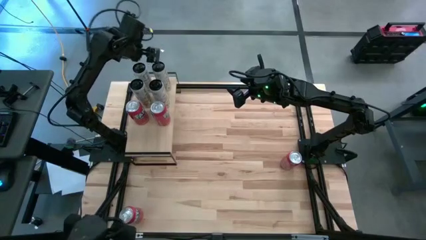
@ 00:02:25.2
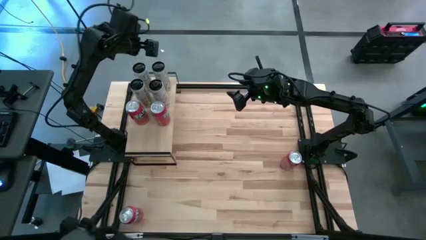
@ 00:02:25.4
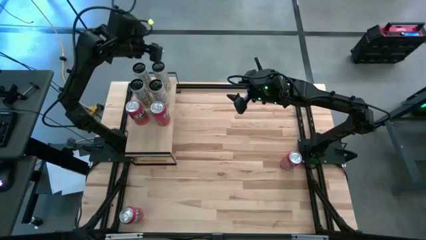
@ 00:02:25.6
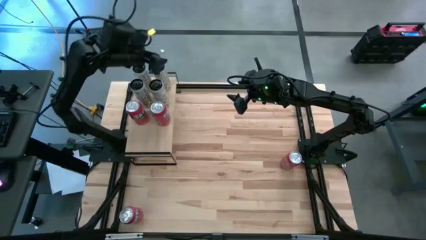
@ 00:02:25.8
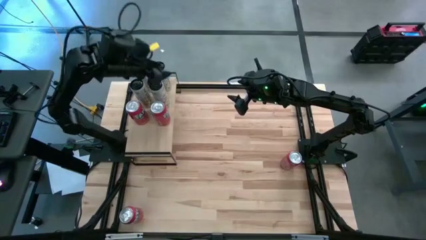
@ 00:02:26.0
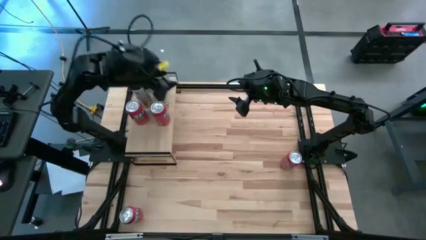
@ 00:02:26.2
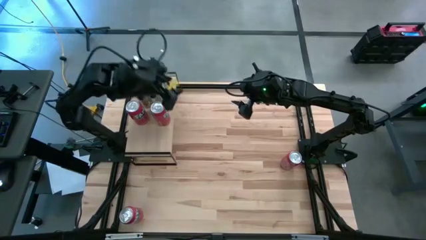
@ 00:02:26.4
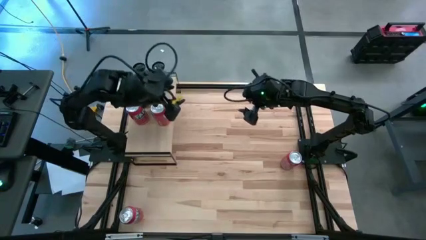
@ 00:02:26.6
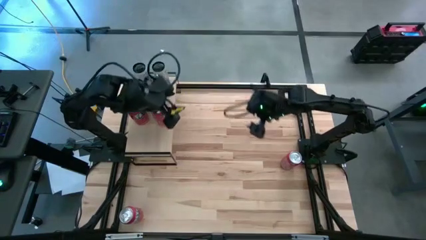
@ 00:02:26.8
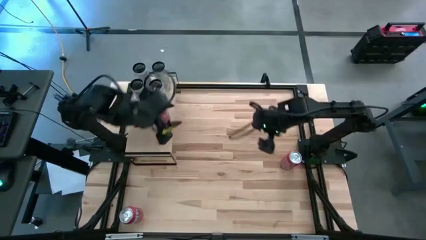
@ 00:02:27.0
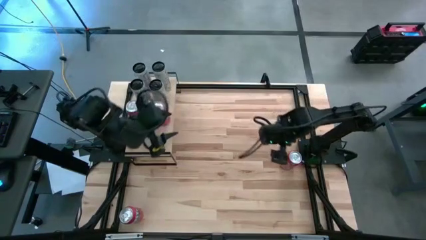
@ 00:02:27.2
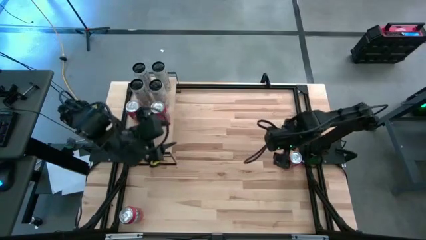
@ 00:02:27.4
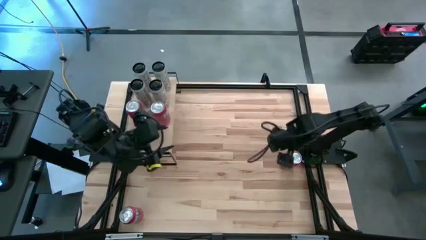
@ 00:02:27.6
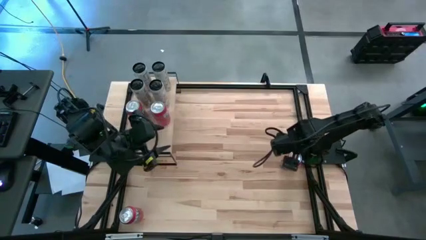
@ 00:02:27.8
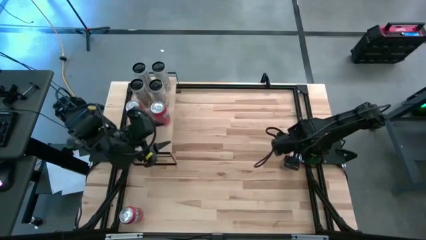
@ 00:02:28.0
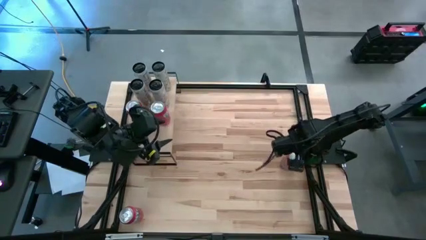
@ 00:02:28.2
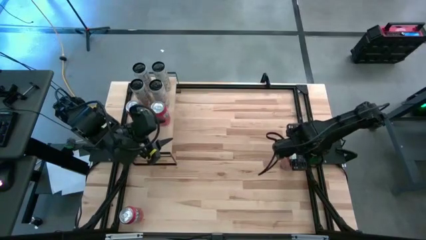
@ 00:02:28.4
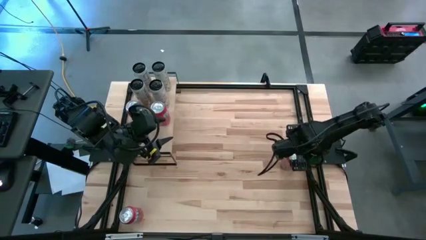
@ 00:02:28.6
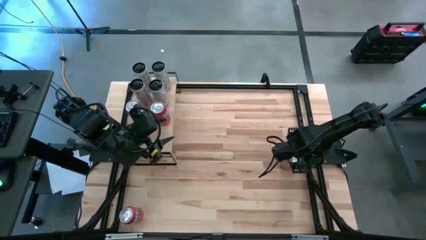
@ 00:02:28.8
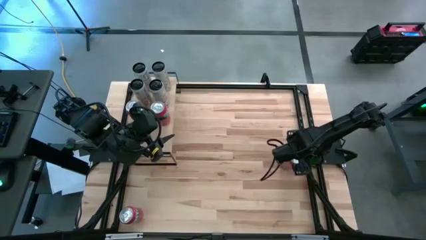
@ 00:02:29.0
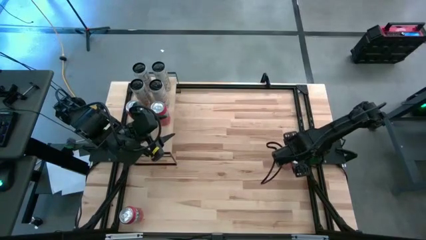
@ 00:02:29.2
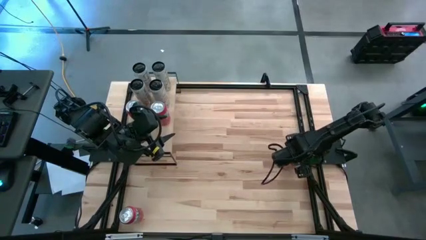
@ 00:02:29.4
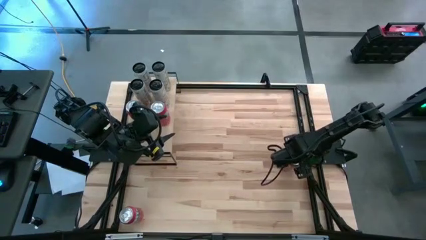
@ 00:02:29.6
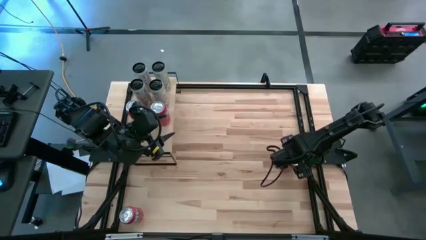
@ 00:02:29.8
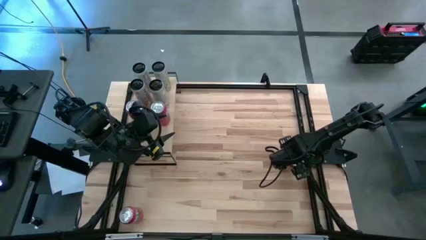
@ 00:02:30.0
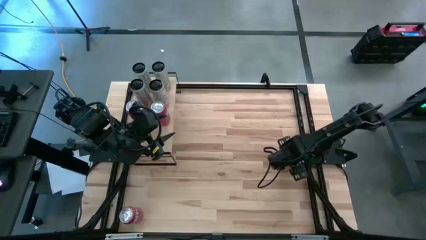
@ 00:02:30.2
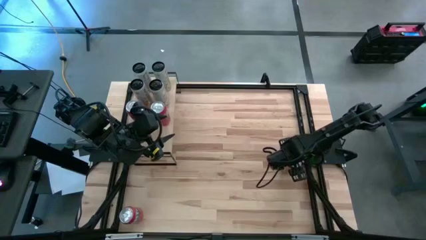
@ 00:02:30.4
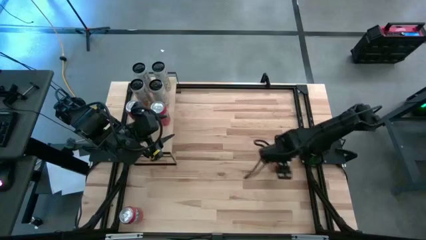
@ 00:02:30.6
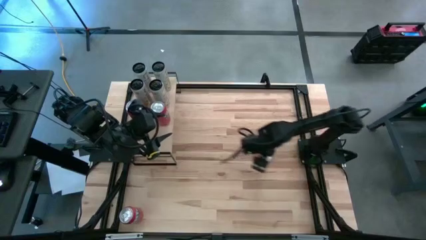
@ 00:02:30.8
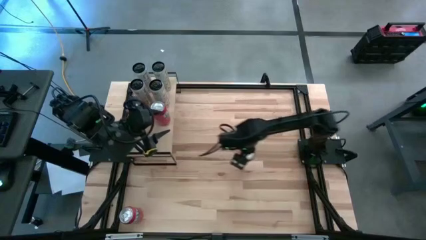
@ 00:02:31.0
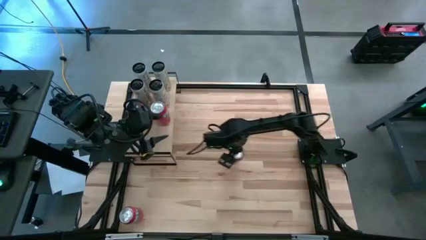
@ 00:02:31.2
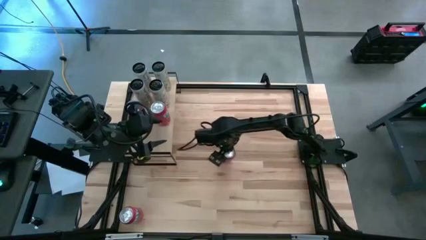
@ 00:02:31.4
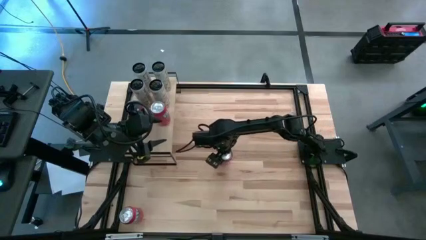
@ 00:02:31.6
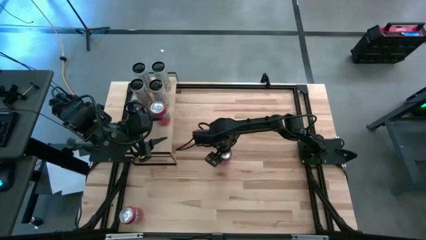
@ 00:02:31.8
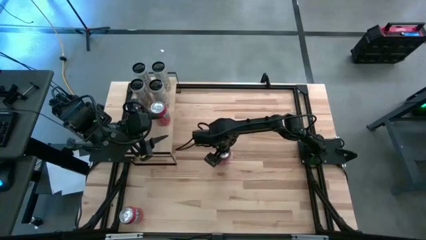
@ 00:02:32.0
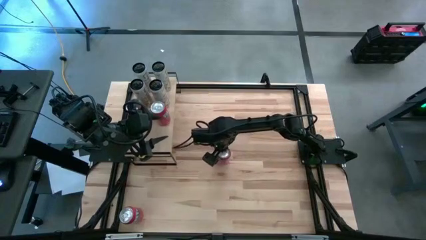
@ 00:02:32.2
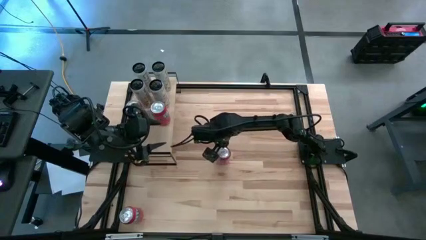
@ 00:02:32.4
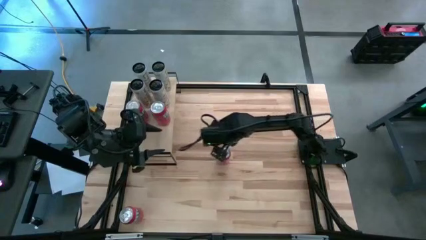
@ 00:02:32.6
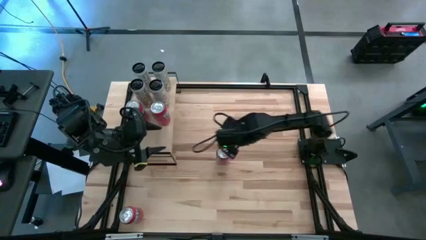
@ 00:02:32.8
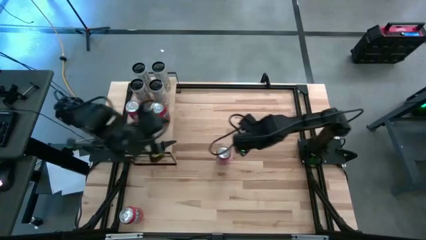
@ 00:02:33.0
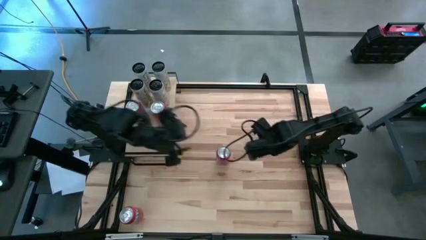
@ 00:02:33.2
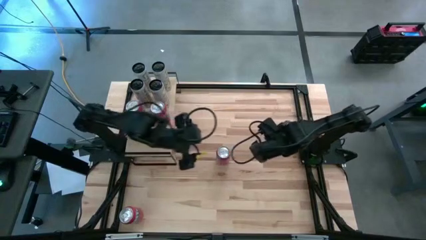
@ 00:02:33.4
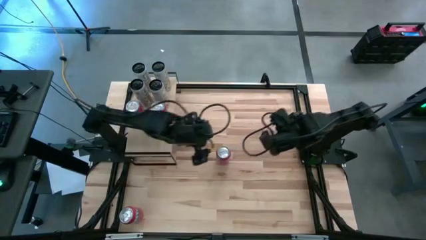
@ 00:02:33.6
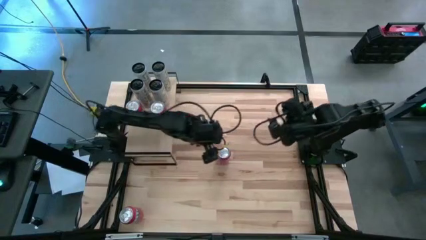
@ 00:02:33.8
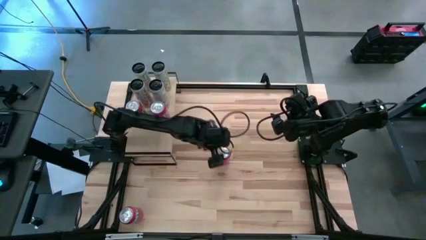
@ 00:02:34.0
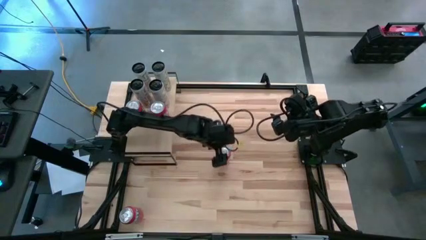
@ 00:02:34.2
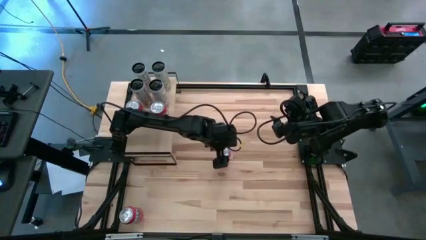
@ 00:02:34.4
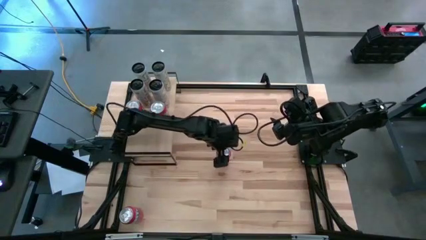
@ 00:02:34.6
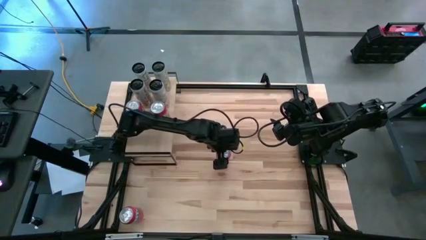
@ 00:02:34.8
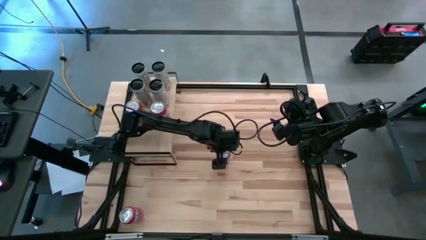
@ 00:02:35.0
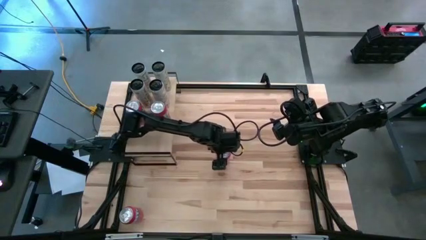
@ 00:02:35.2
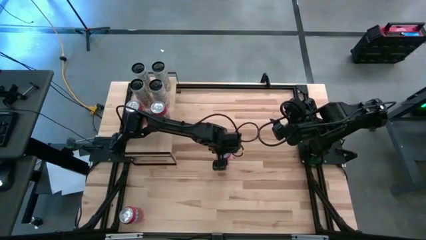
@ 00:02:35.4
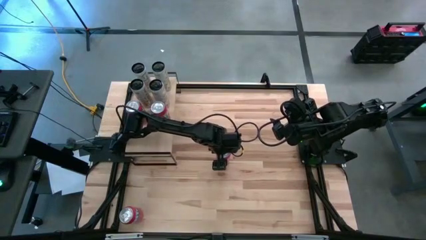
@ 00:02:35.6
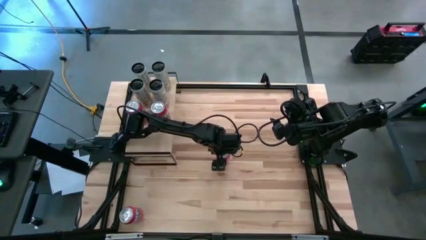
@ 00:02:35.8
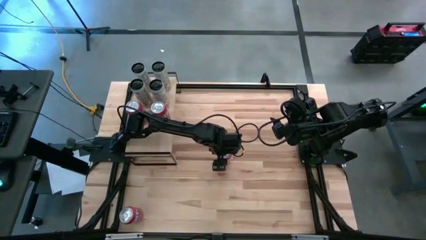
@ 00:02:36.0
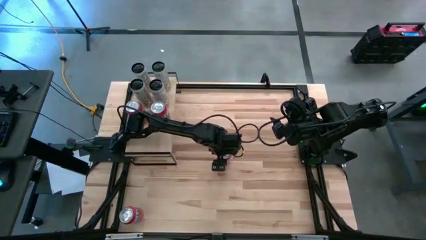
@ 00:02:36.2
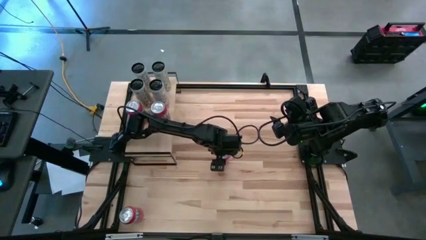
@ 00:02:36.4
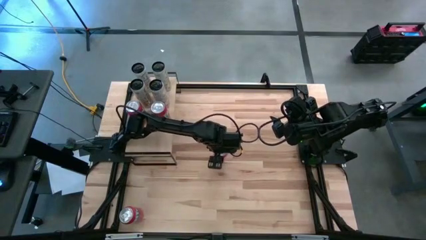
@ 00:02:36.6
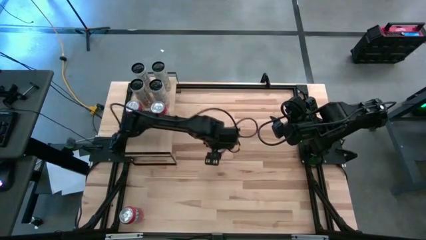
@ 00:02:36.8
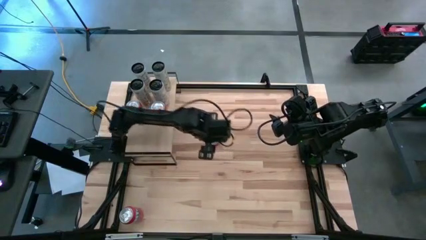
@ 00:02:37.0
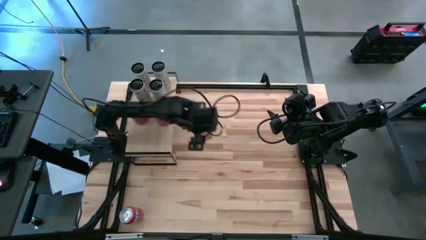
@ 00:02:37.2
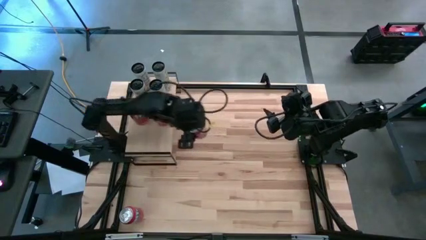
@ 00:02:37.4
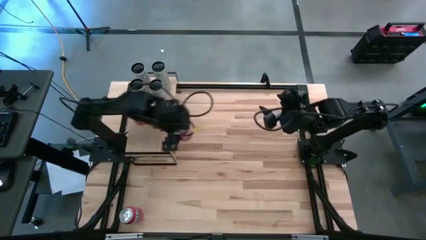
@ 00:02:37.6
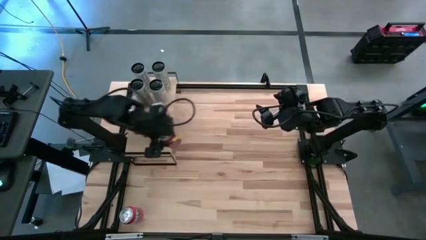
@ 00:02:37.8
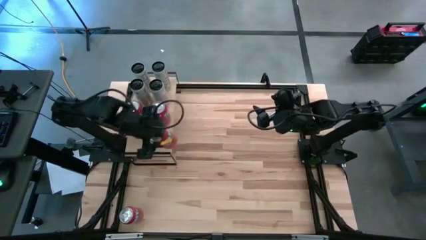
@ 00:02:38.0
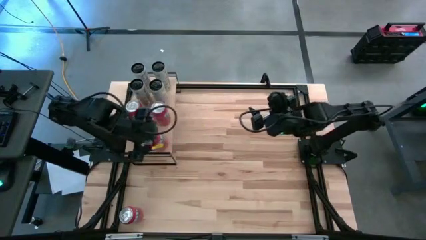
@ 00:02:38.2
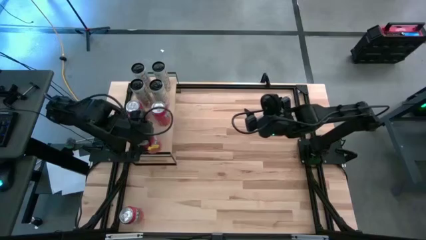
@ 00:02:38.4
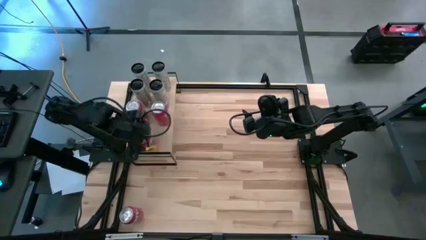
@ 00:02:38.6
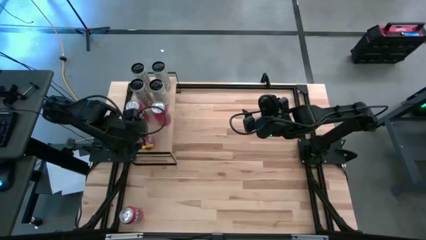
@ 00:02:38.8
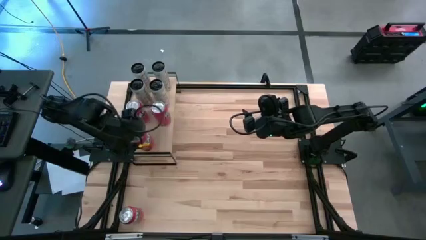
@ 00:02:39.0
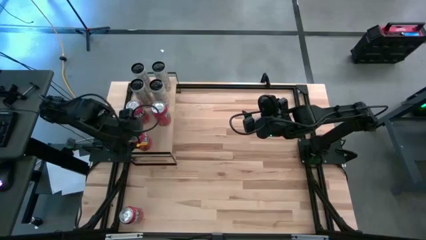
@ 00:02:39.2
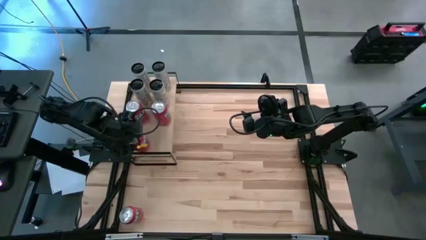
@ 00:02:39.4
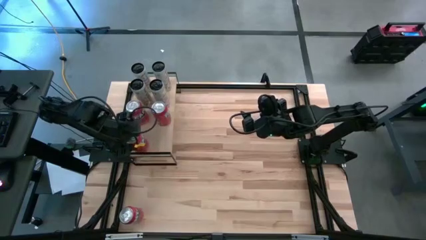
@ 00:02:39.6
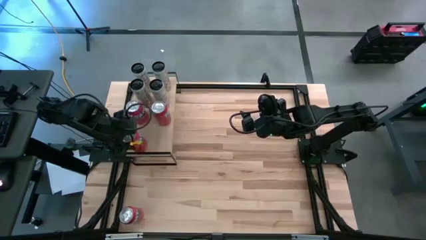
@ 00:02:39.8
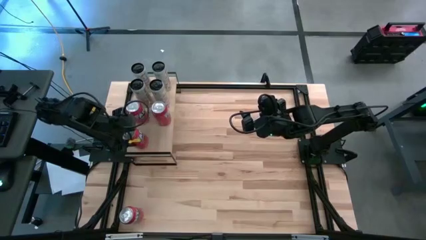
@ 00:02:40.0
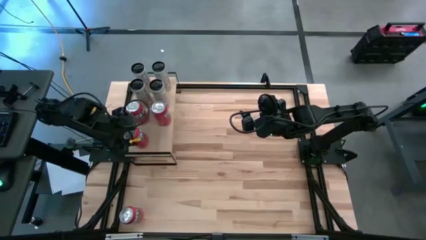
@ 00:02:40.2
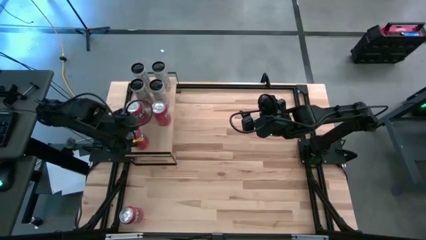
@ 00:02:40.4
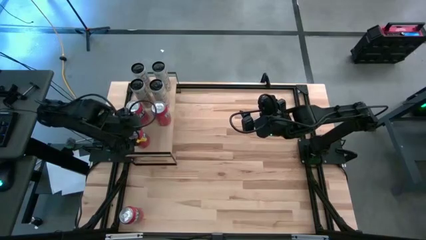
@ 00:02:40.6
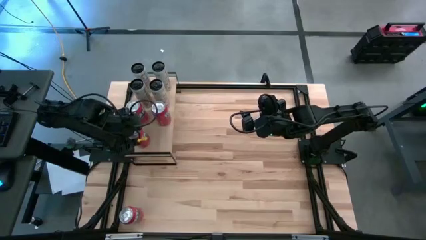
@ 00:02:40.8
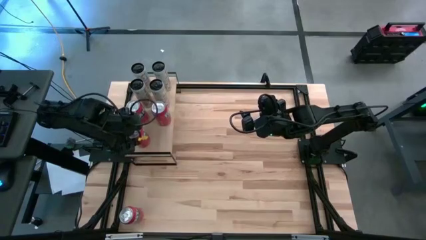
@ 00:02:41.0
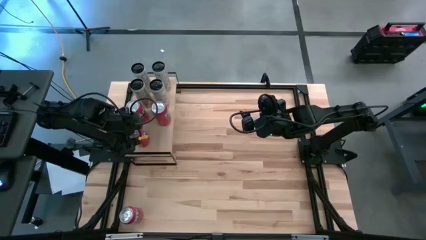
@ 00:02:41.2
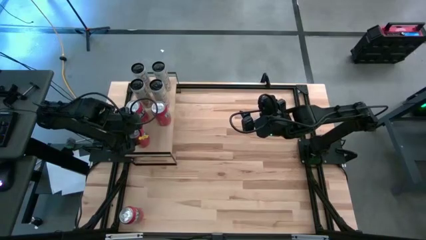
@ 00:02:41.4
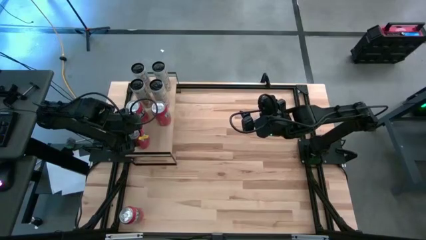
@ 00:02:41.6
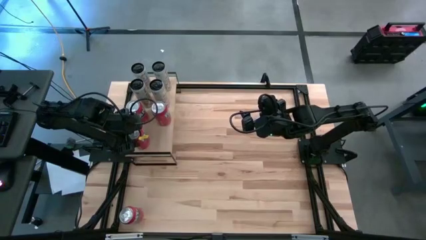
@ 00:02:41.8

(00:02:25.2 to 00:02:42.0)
Task: Place canned beverage on shelf
Put the top red soda can on the shelf
